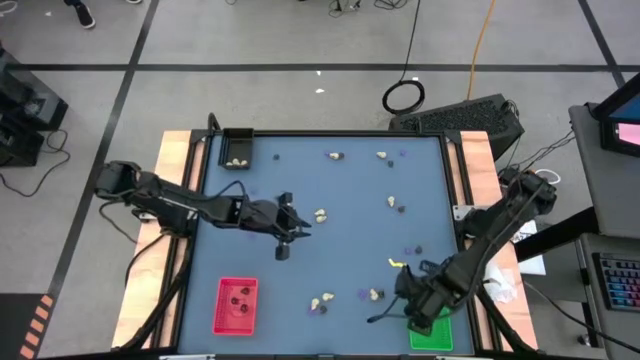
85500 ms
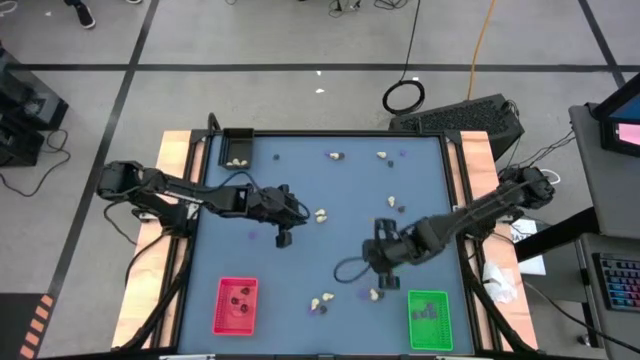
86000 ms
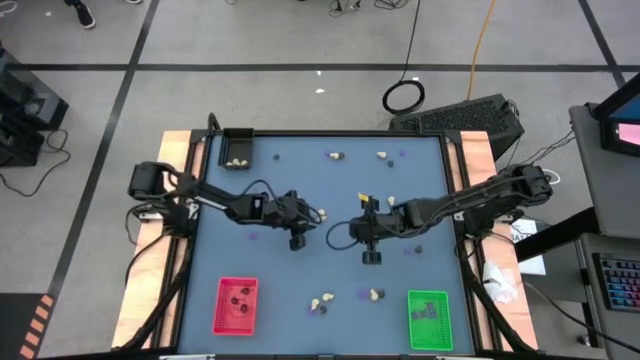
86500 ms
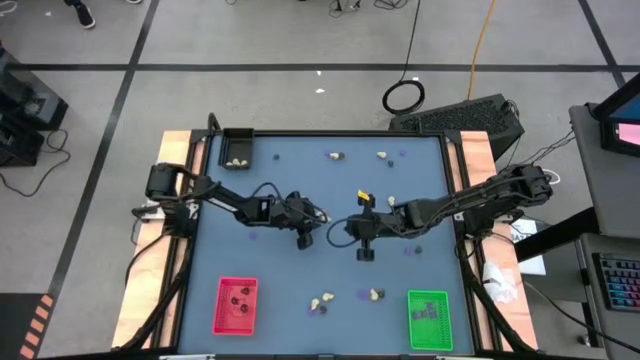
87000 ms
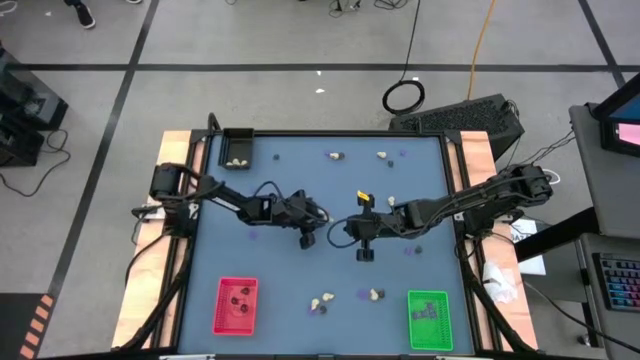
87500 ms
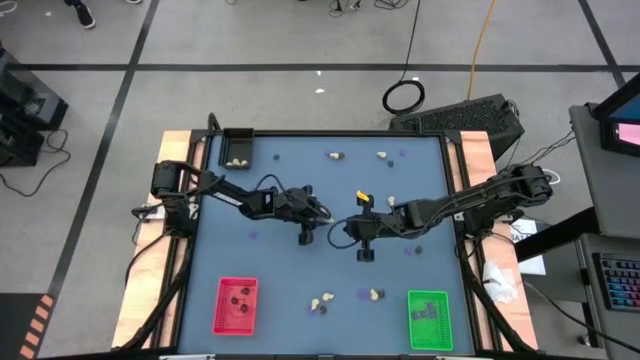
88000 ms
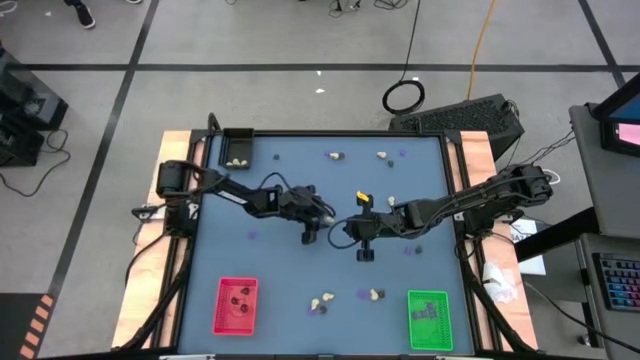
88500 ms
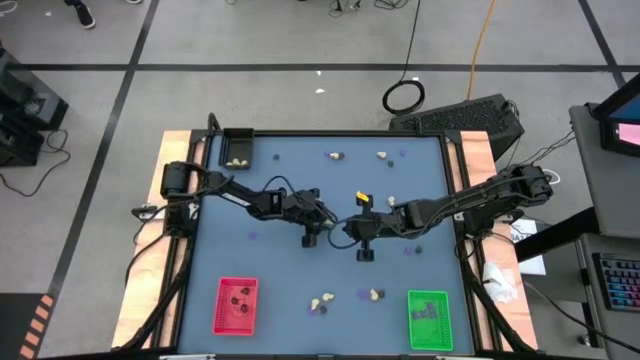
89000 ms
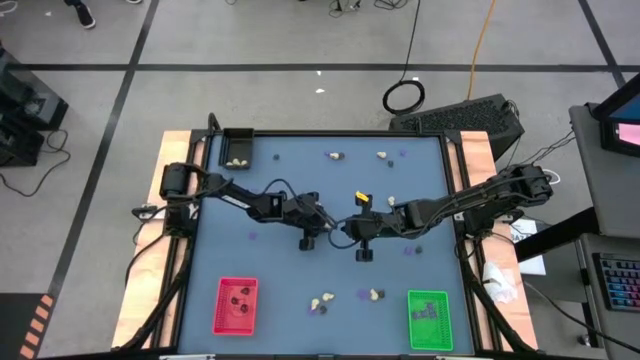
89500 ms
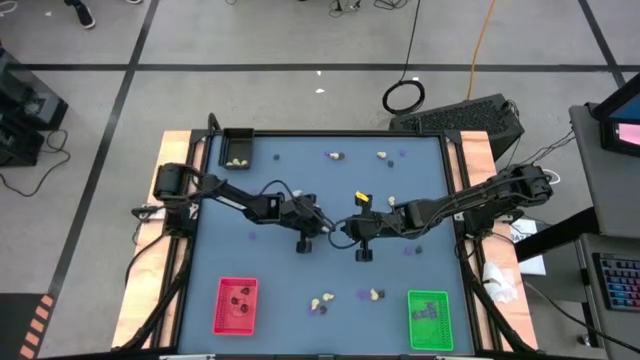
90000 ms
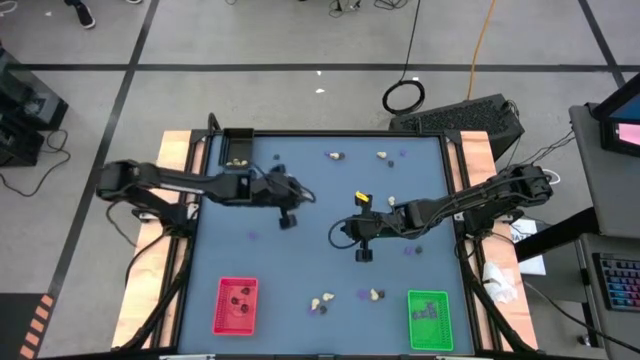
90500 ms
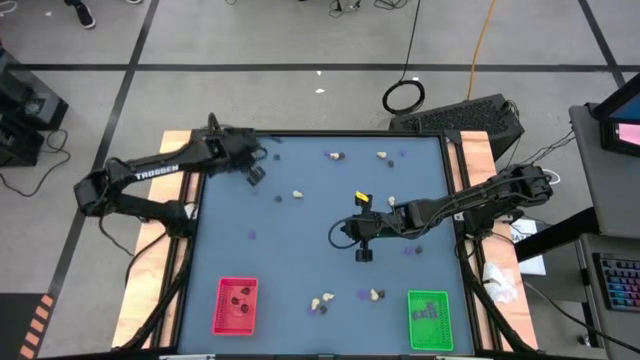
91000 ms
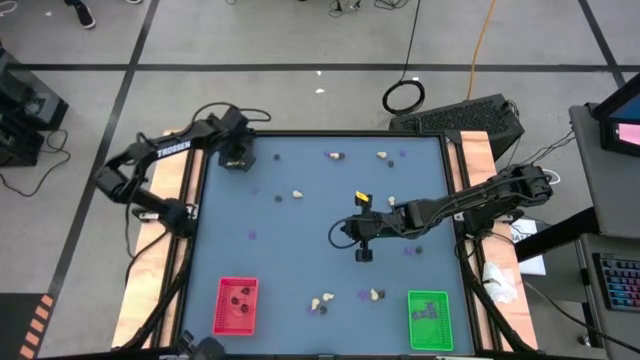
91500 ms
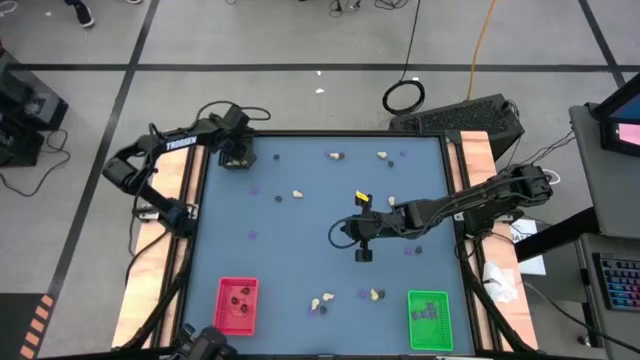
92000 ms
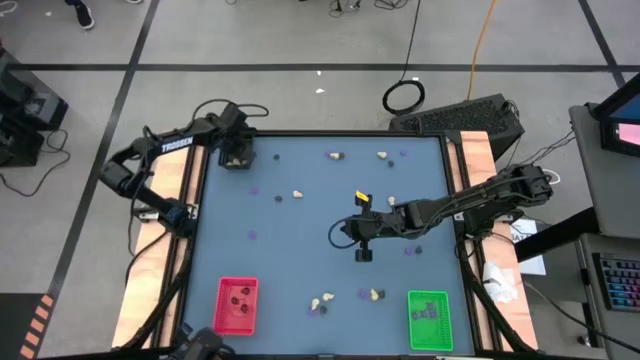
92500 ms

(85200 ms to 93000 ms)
Task: Sort Halloween decoration
Put the white skull toy into the black bin

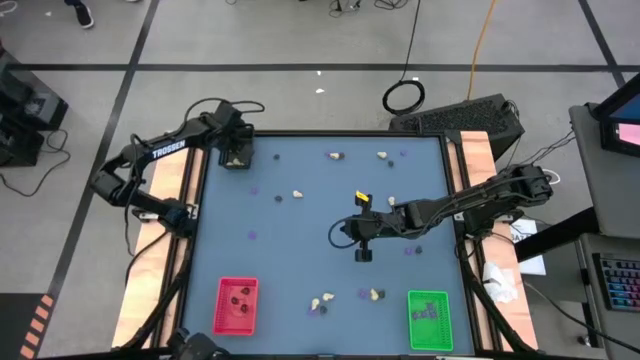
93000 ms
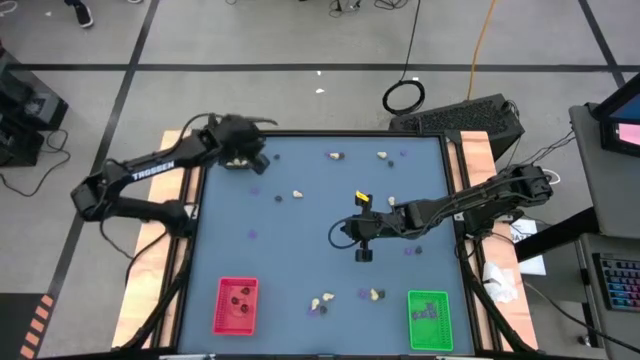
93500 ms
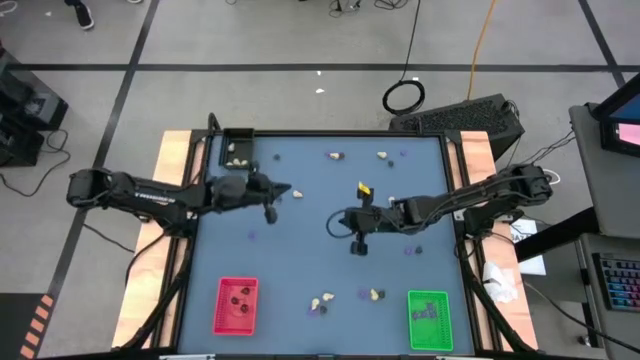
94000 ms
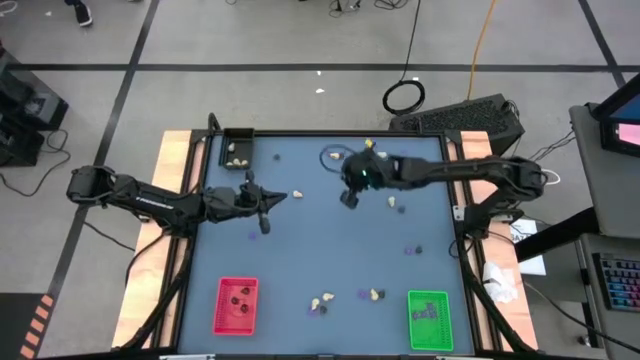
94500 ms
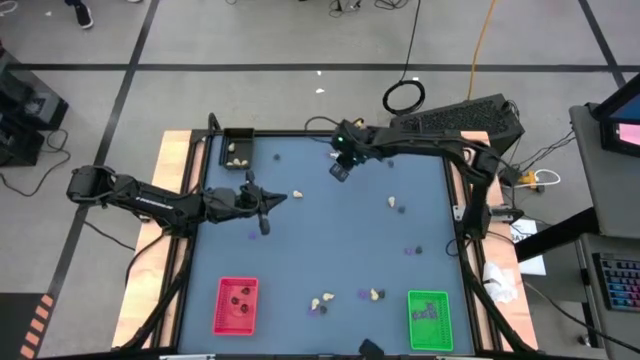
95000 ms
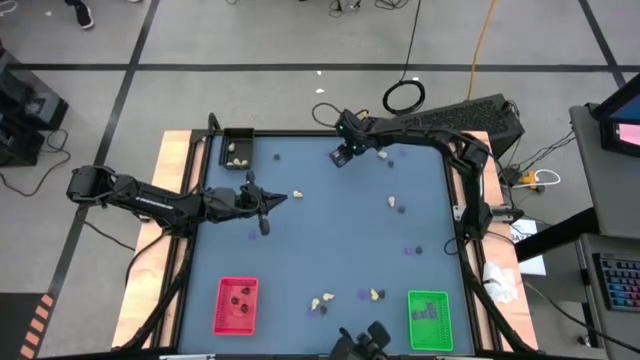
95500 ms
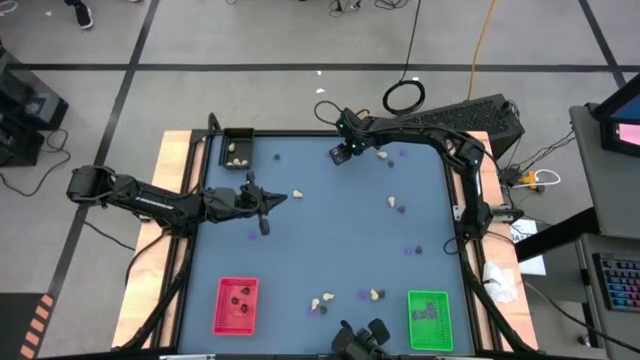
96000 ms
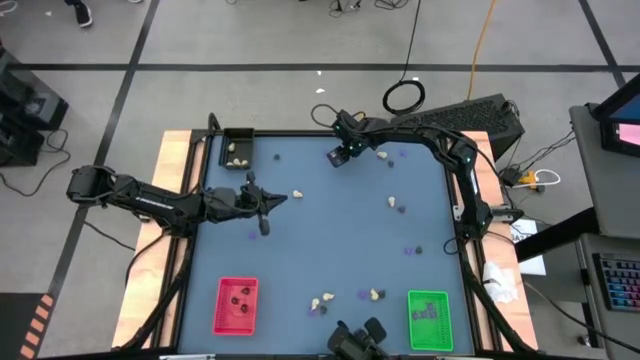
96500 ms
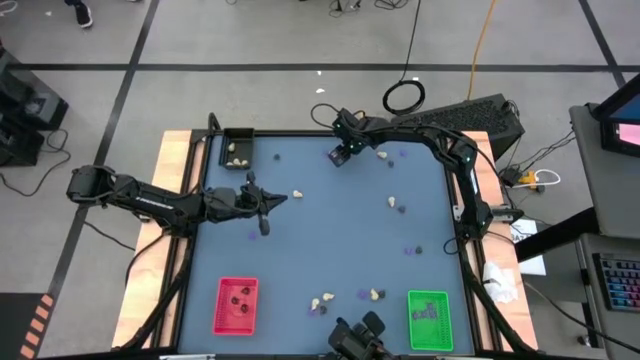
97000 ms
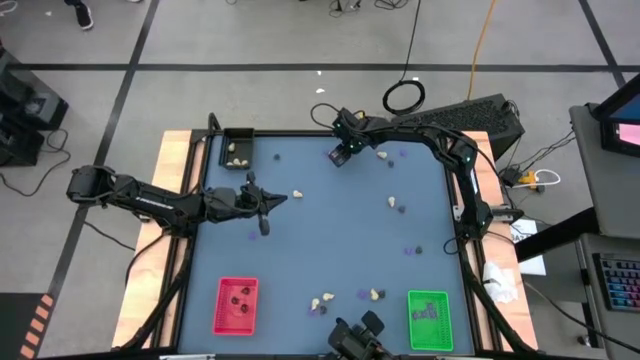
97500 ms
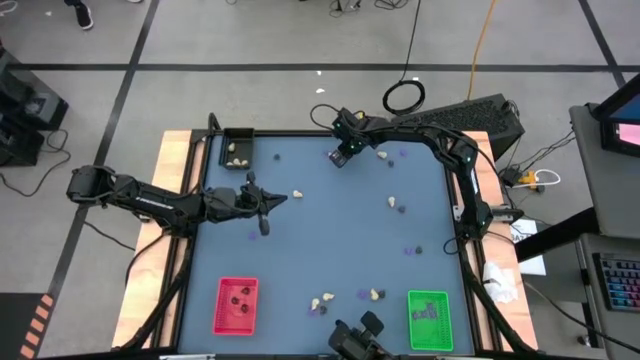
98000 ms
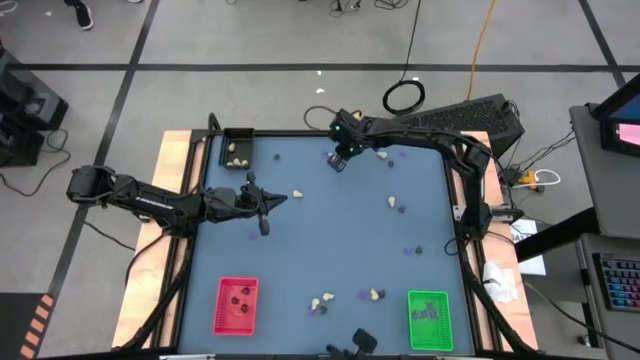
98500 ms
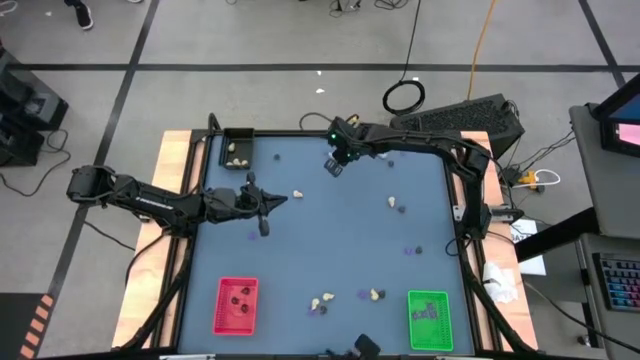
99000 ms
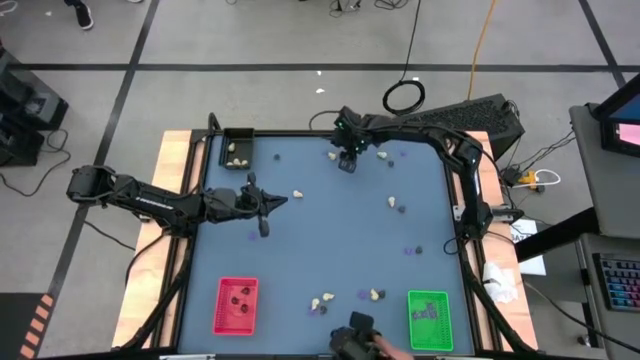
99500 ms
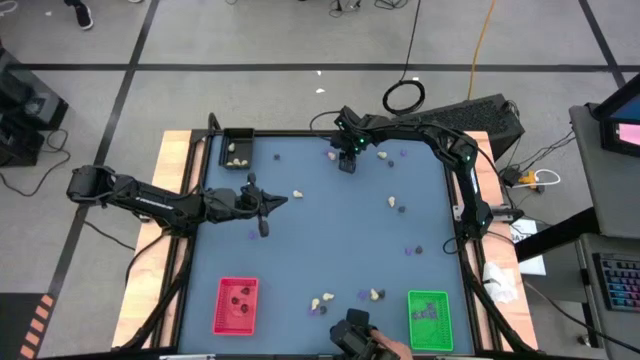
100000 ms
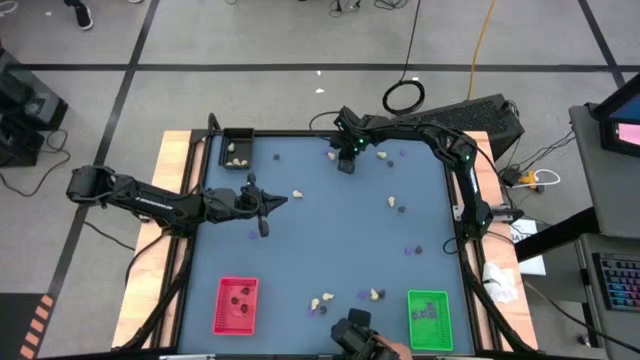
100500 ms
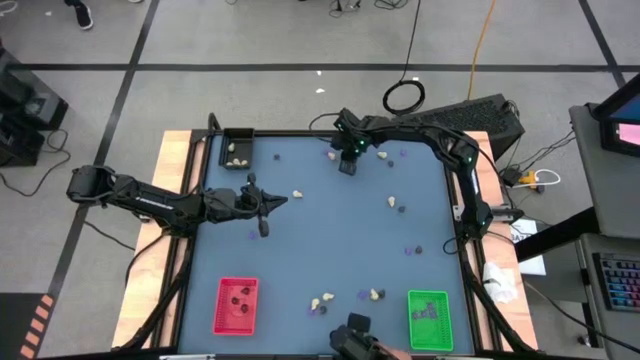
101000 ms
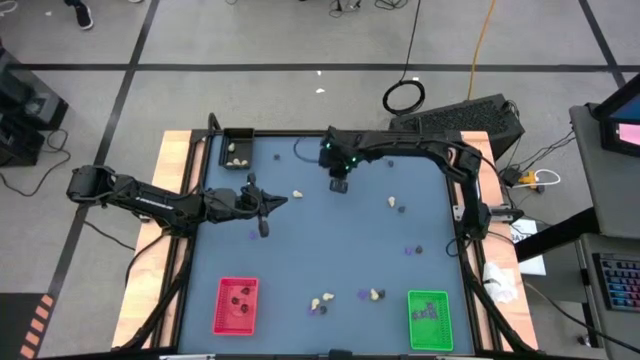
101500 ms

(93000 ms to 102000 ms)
Put the black skull toy into the red bin

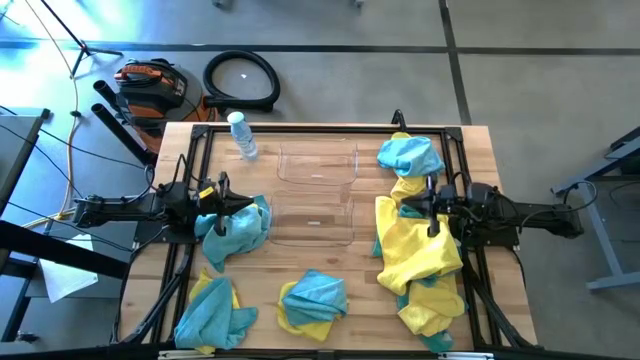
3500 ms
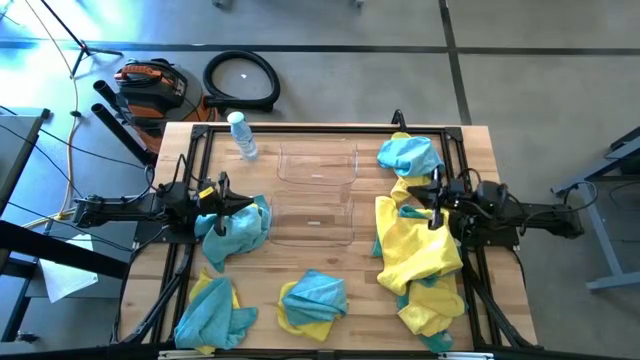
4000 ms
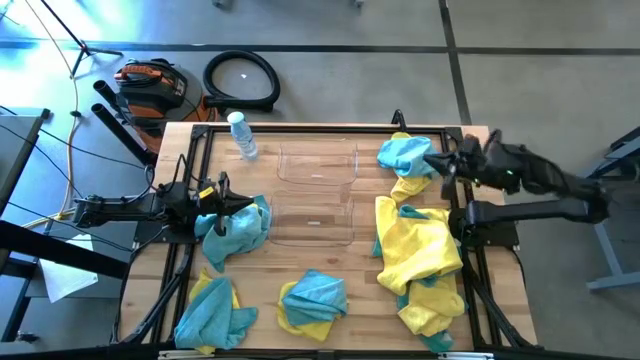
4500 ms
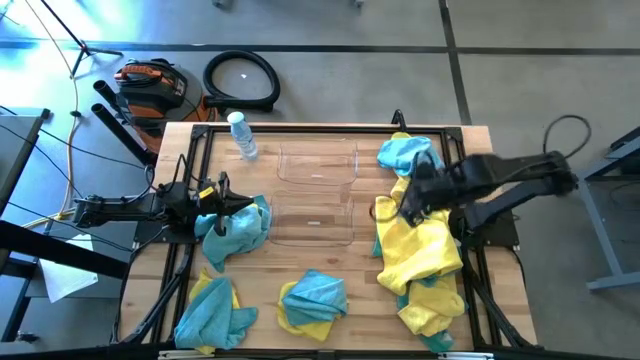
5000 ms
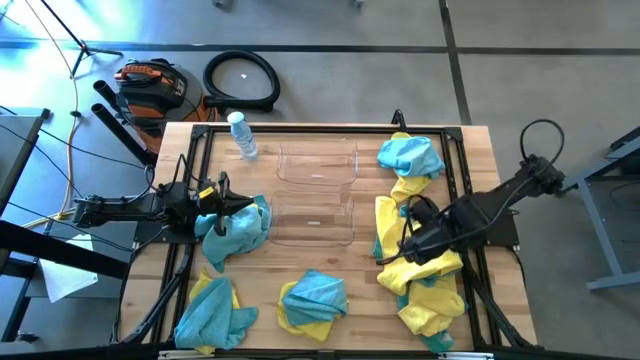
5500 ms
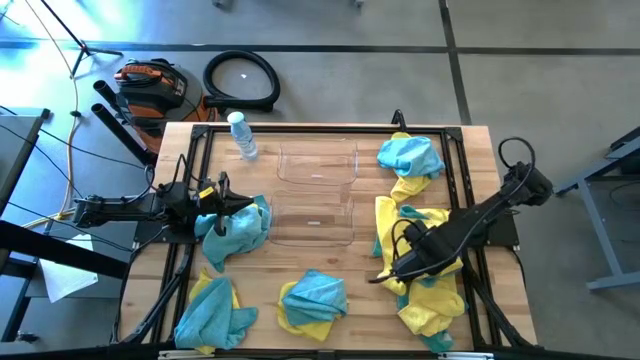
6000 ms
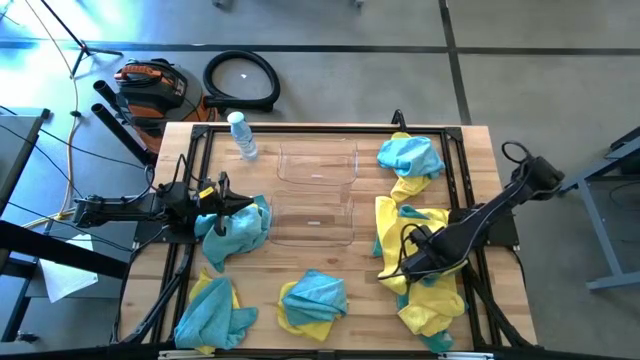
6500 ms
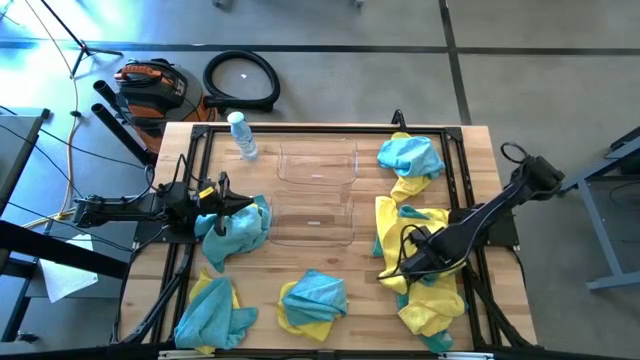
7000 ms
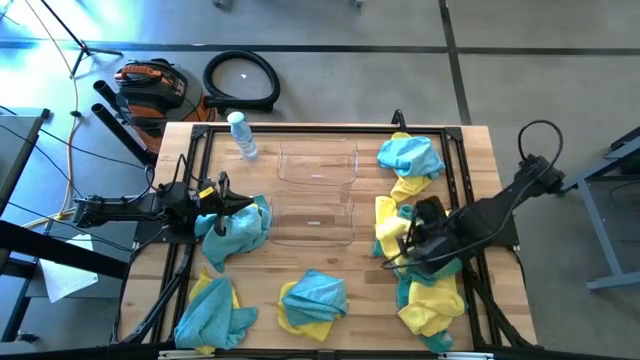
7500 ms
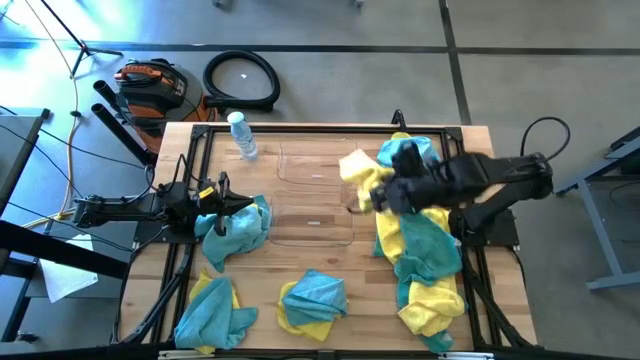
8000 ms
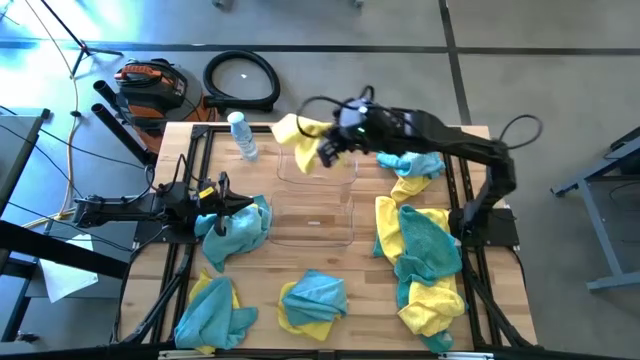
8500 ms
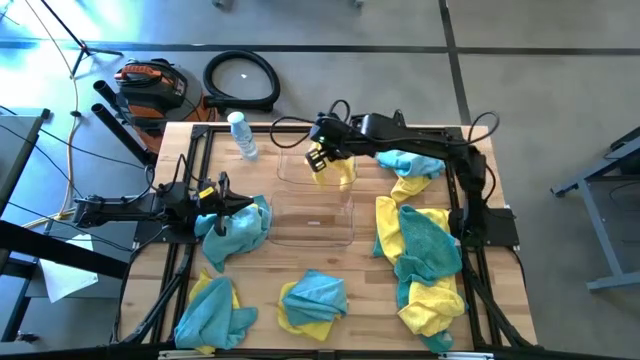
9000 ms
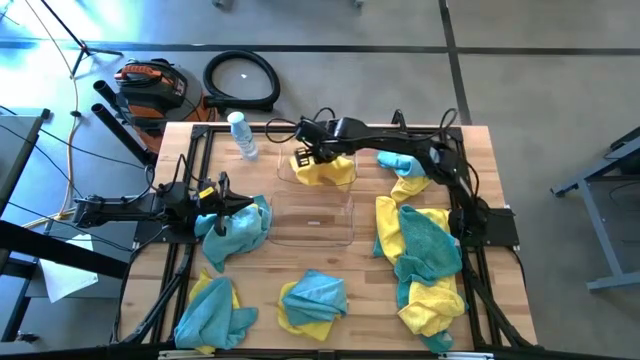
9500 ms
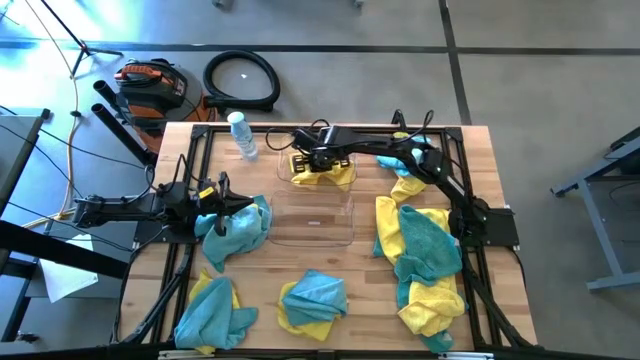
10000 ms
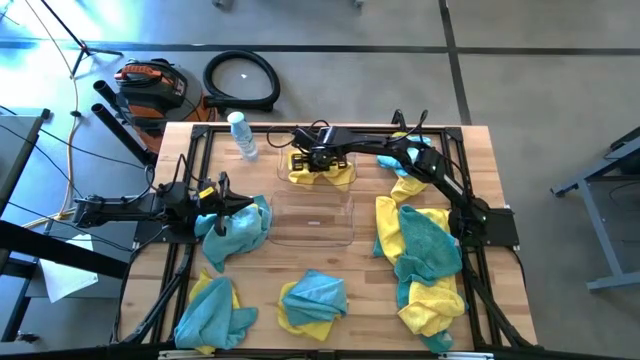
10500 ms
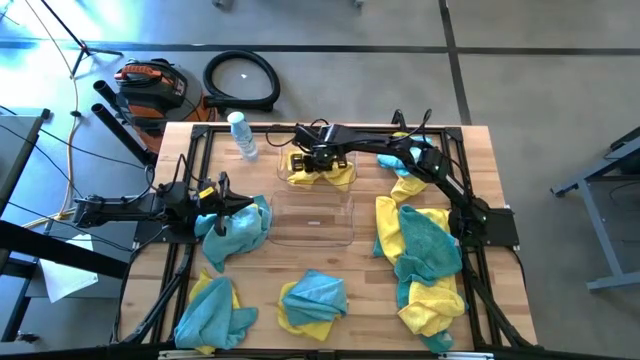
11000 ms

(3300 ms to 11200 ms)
Task: Sort microfiber towel by color & place in baskets
Put the yellow microfiber cloth into the top transparent bin
